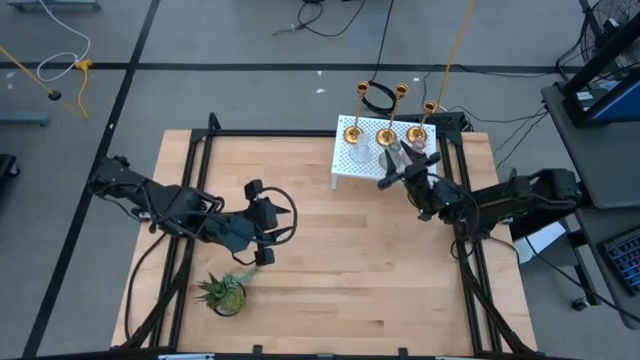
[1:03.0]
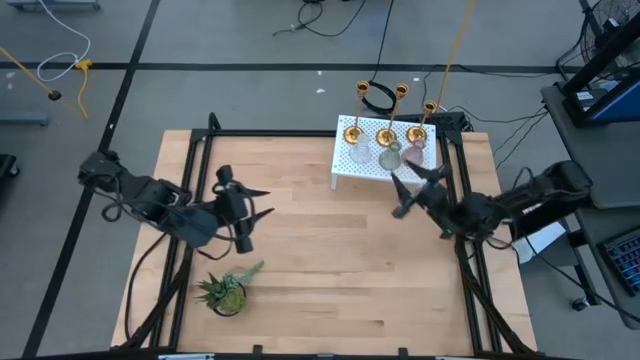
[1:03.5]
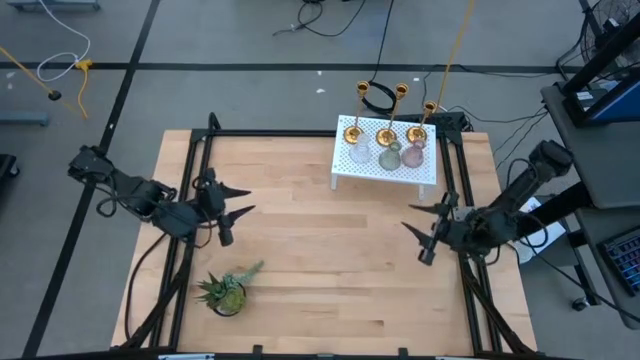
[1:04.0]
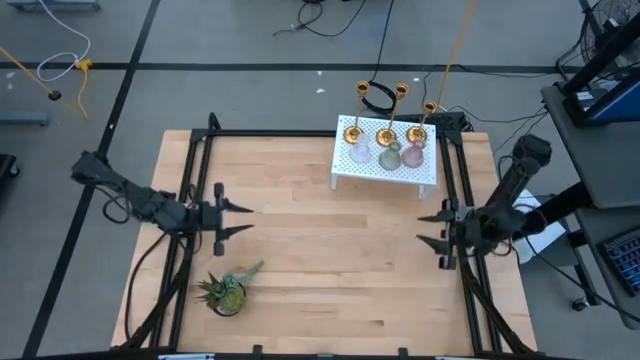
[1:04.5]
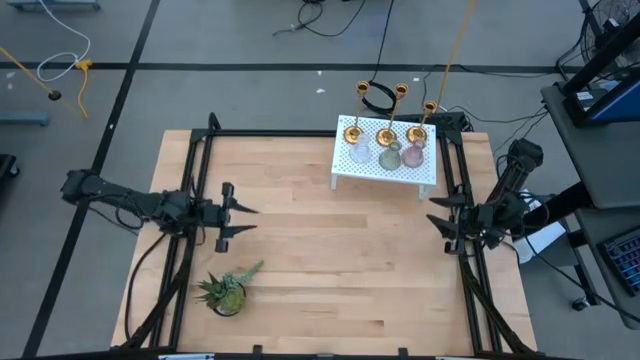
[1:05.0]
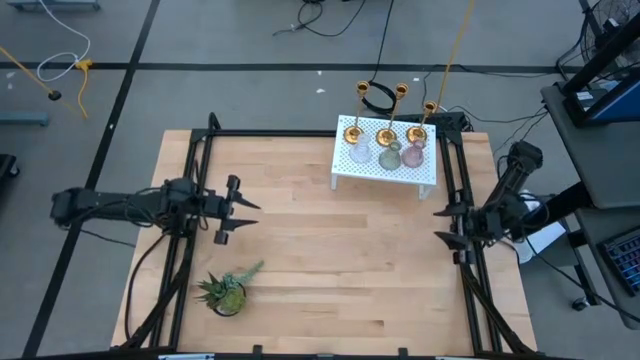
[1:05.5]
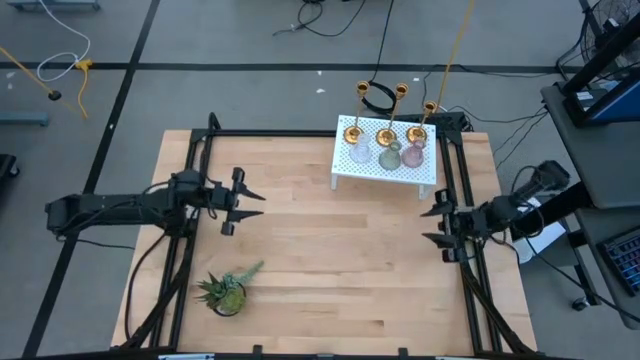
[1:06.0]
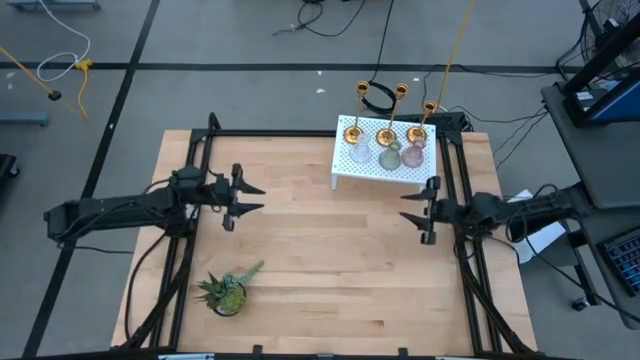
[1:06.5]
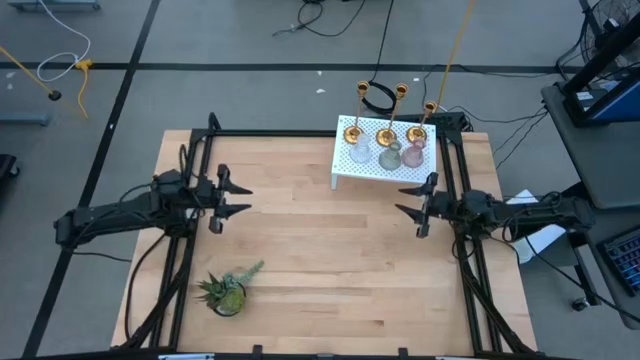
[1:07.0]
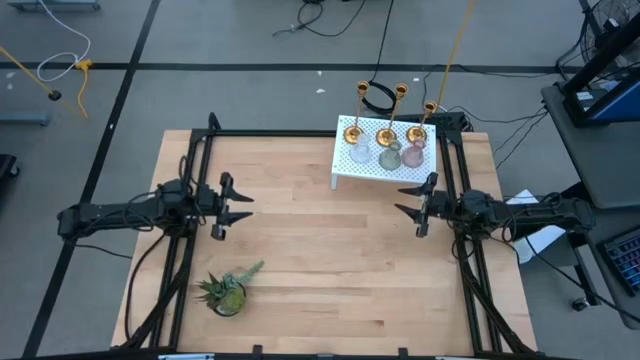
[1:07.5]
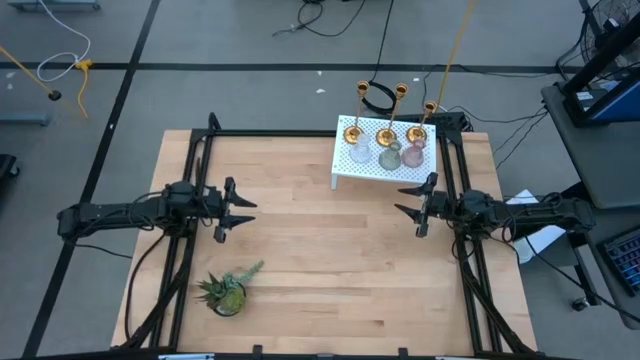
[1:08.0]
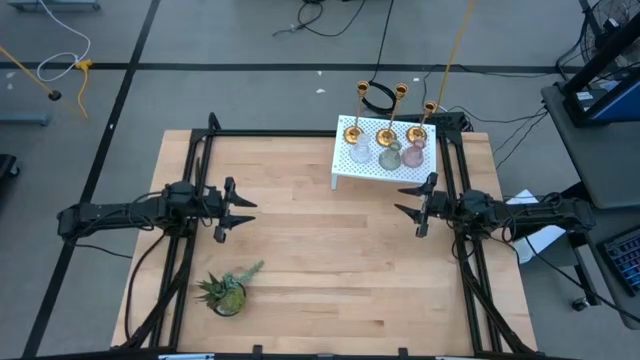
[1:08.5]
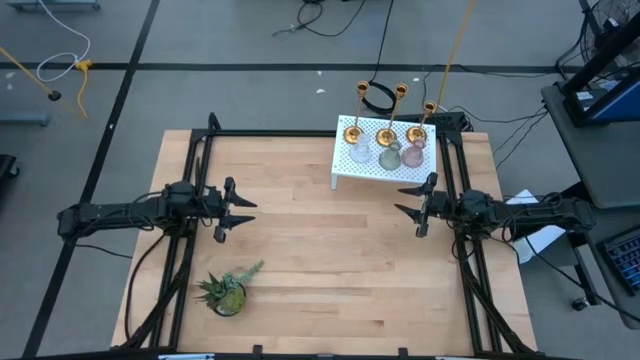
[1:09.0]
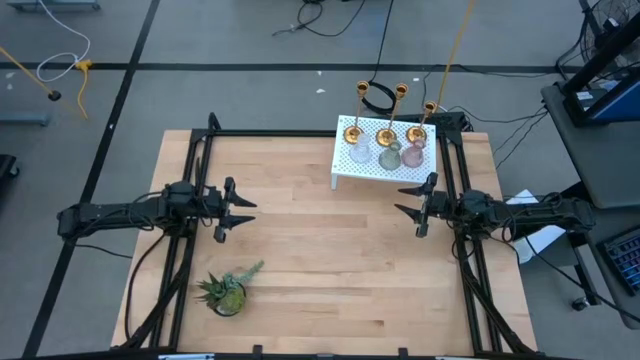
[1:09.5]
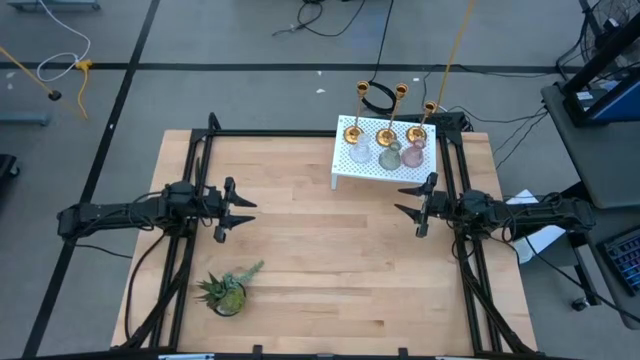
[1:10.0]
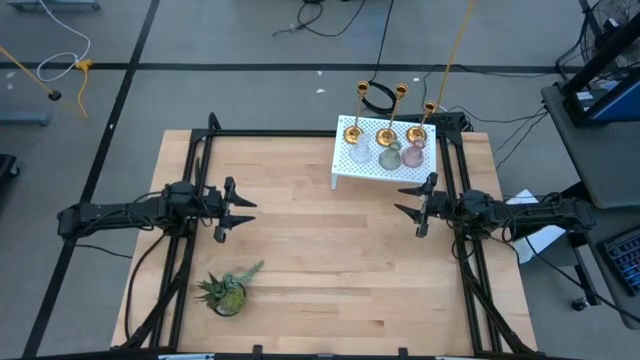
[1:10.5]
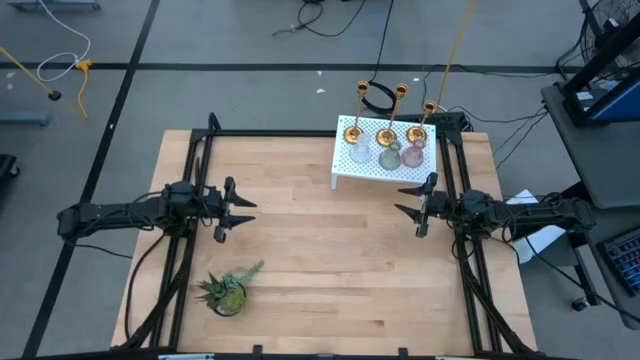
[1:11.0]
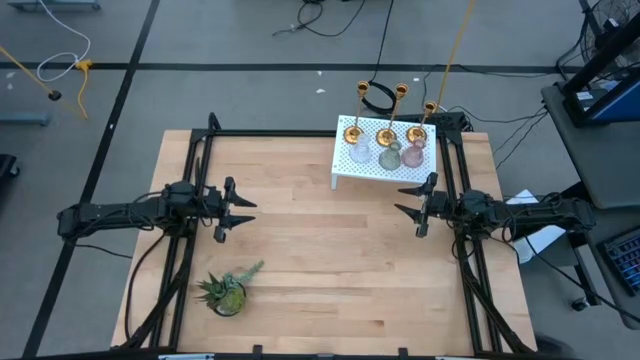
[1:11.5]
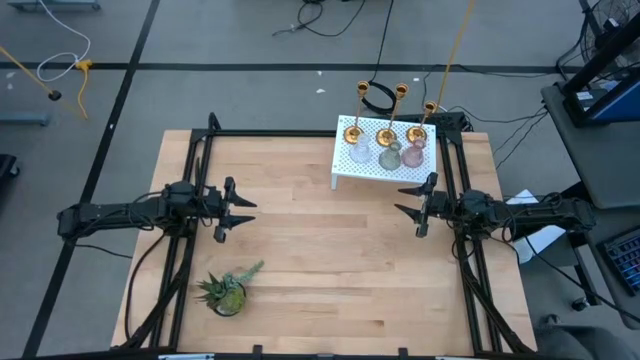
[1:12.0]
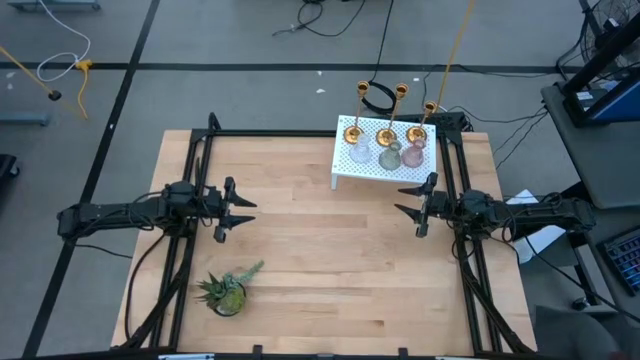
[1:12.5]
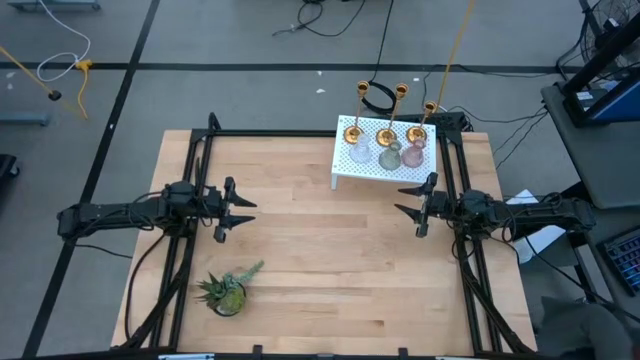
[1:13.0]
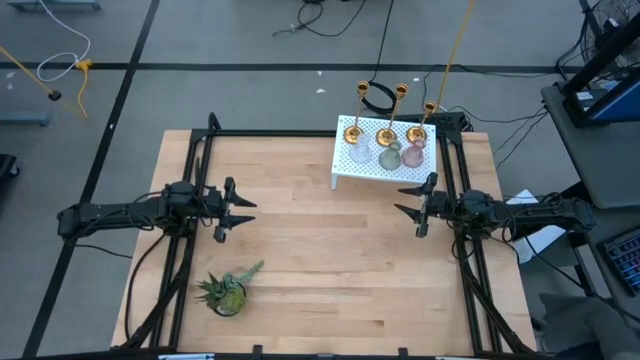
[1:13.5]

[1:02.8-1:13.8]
Task: Pick & Place candle stick holders
Return to Home Position

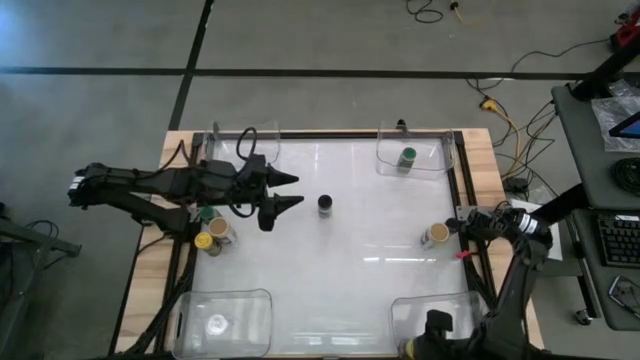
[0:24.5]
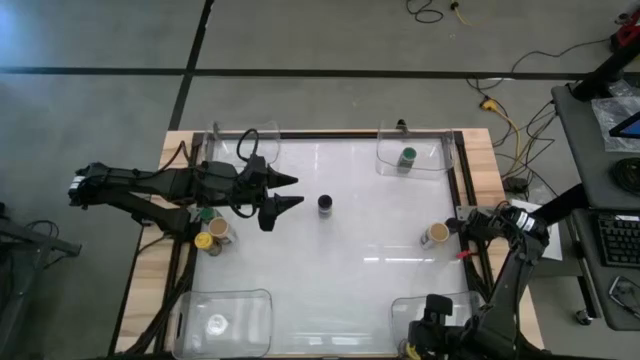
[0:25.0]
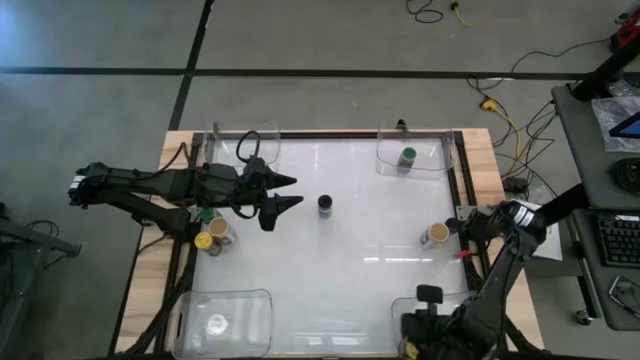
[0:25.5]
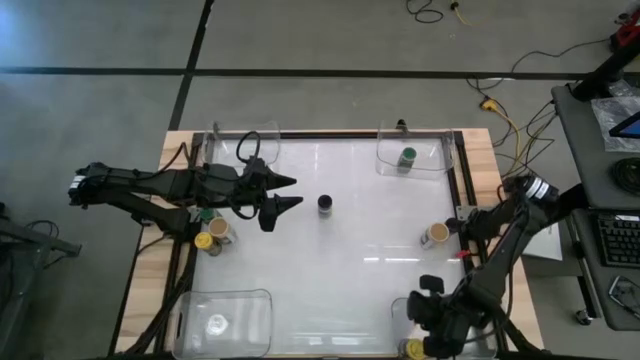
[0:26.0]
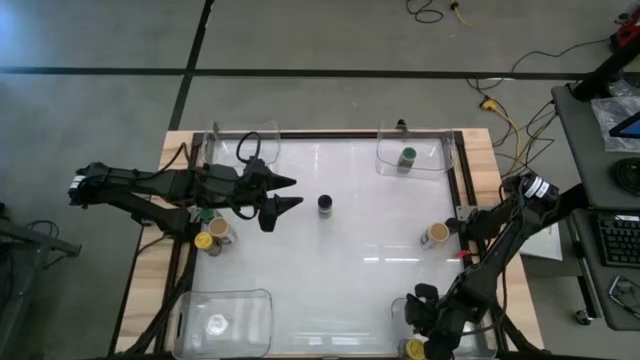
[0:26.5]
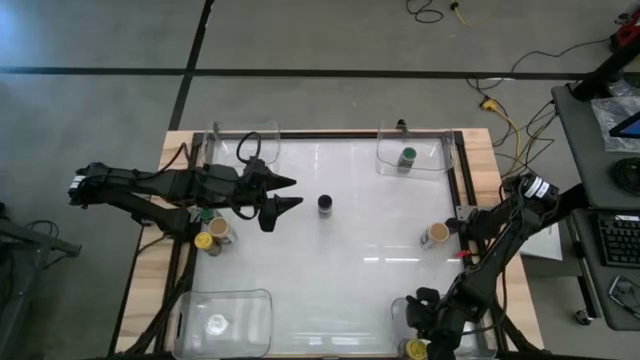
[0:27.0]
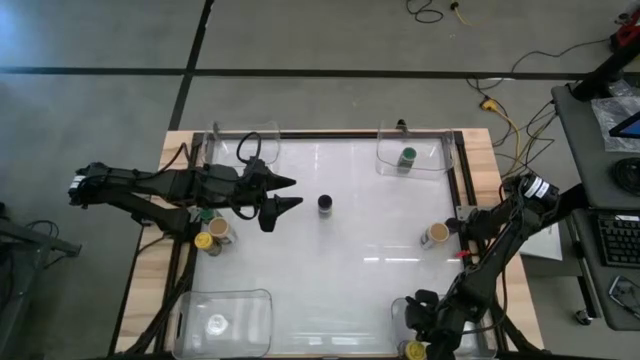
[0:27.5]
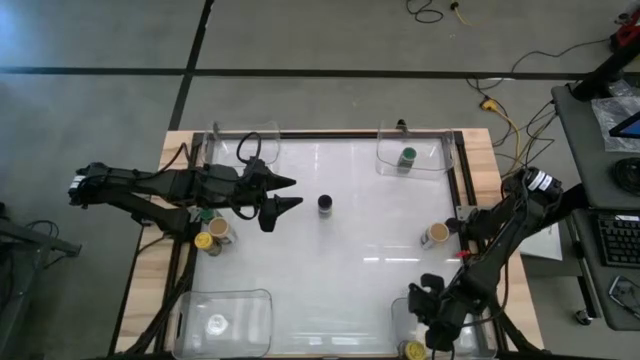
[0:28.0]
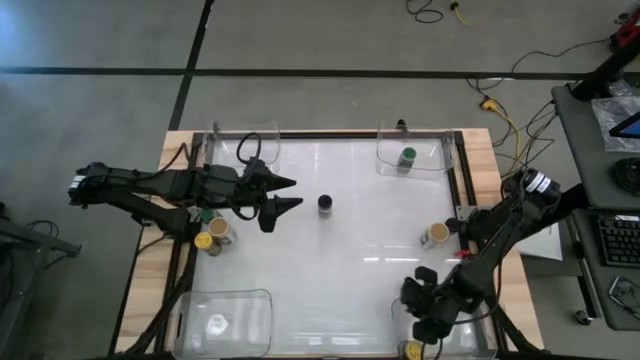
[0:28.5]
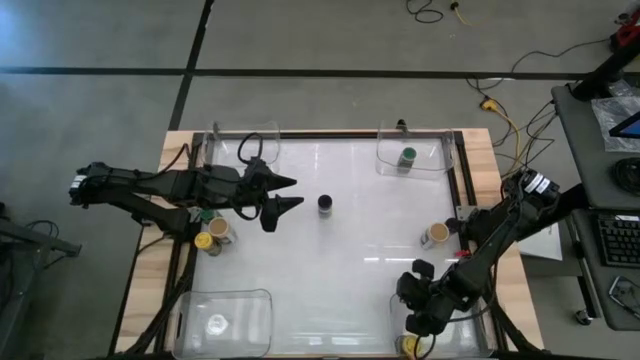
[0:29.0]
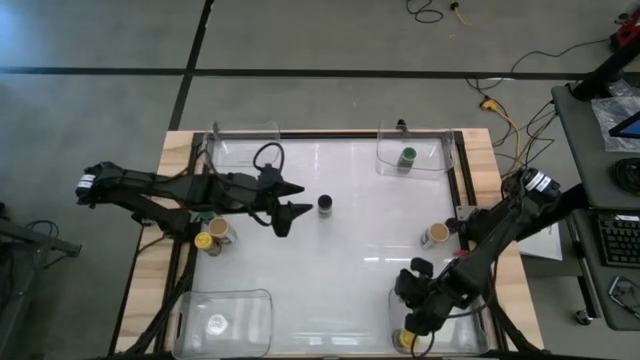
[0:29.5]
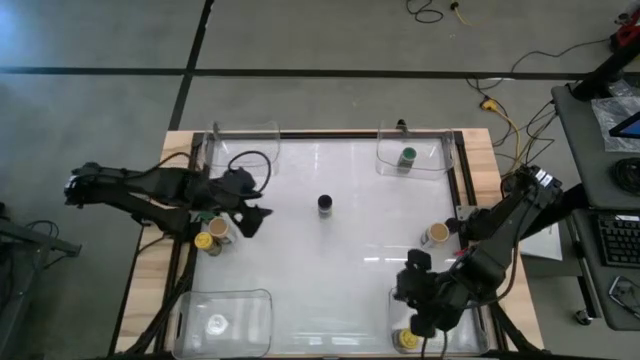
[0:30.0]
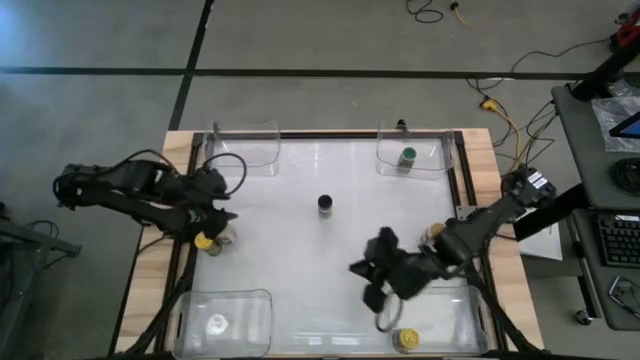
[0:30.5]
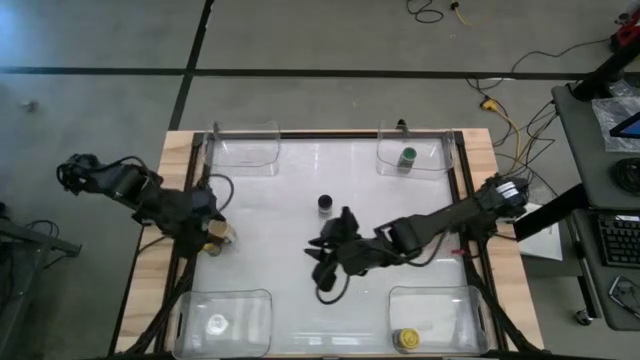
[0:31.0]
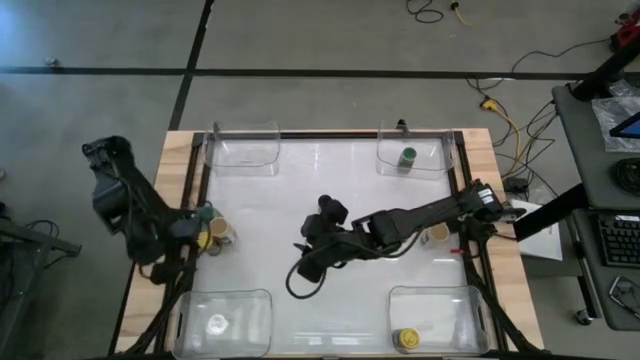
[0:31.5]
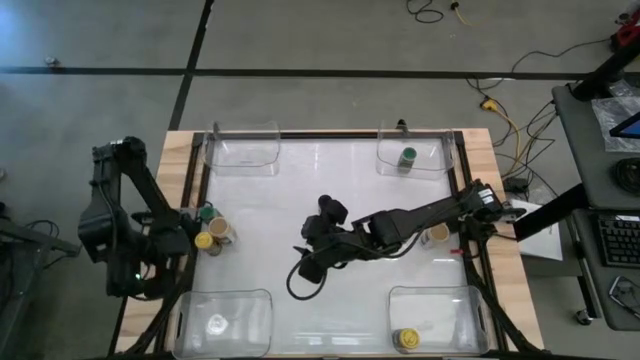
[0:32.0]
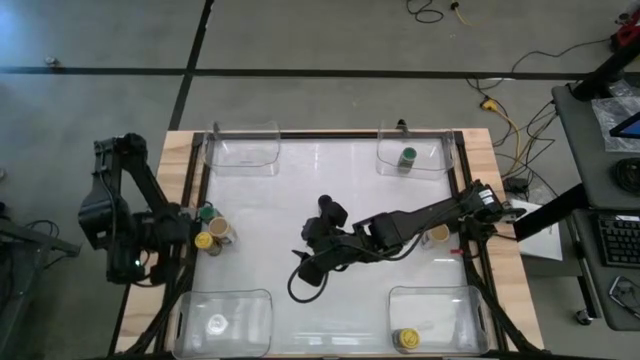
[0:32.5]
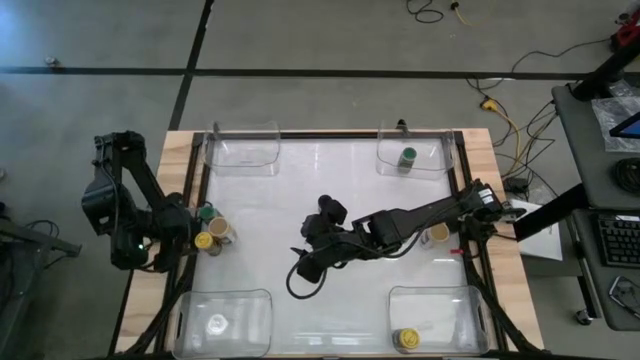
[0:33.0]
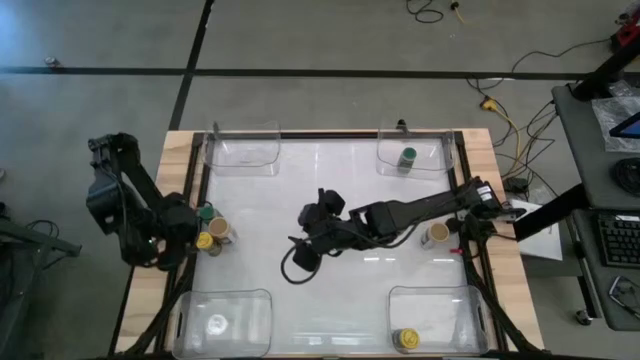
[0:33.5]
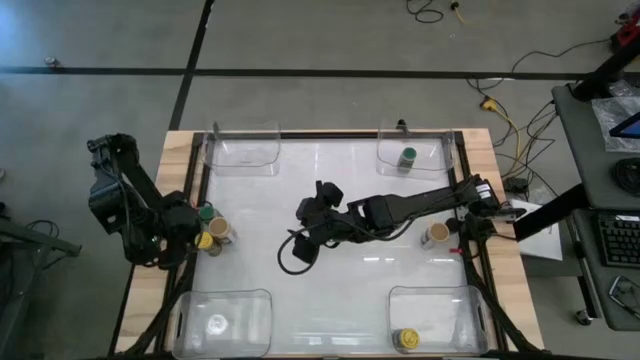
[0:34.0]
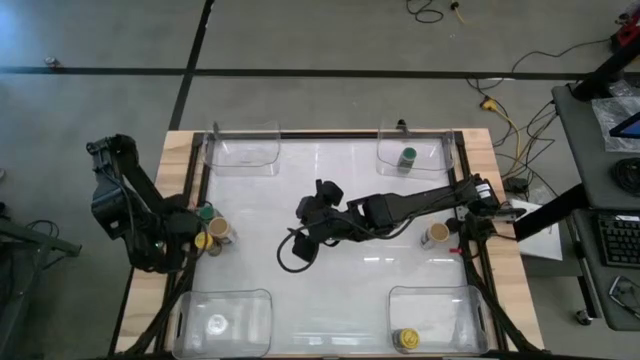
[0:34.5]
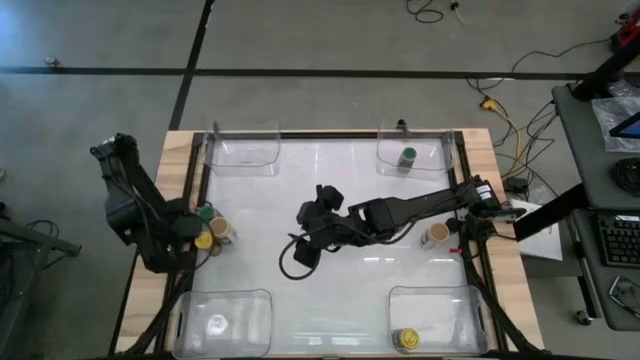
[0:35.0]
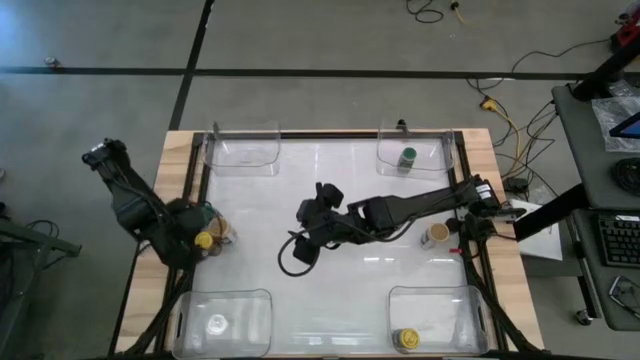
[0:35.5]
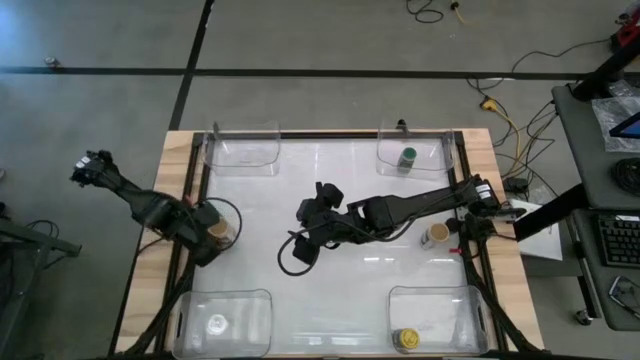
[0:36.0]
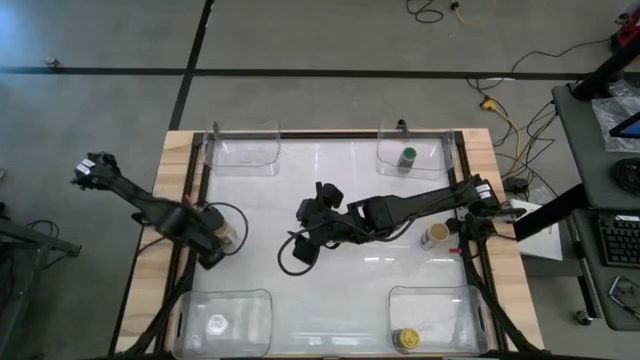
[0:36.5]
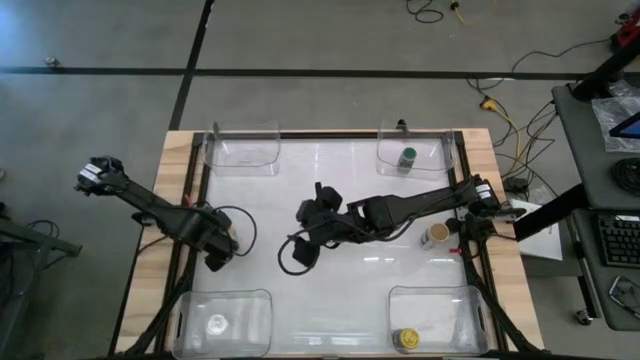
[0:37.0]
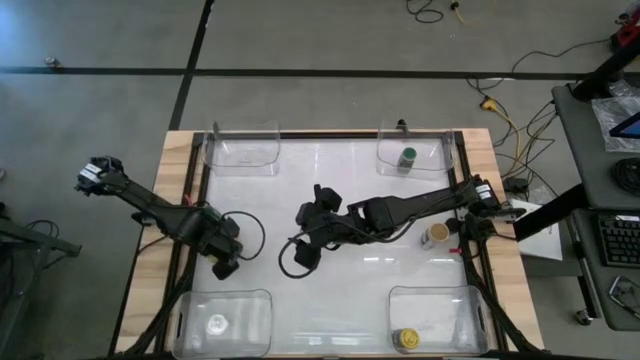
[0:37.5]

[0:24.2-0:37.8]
Task: Sort spices by type
Put the yellow seasoning bottle into the bottom right transparent bin
